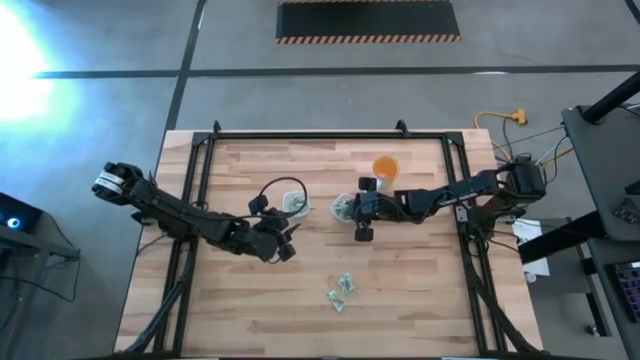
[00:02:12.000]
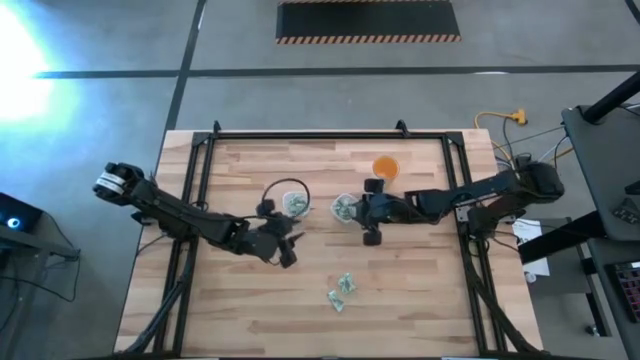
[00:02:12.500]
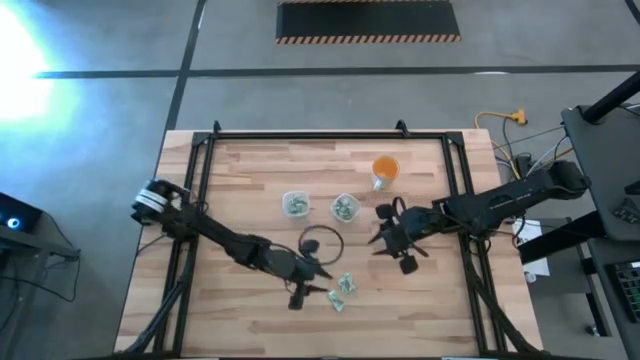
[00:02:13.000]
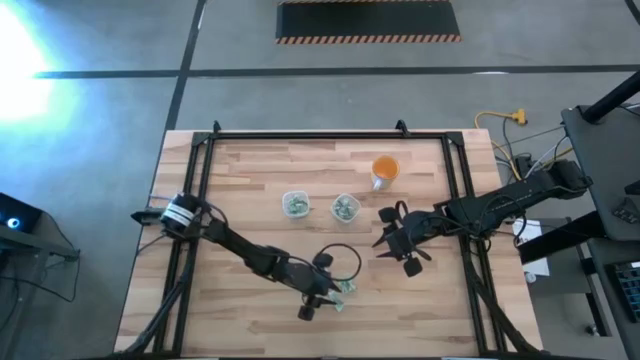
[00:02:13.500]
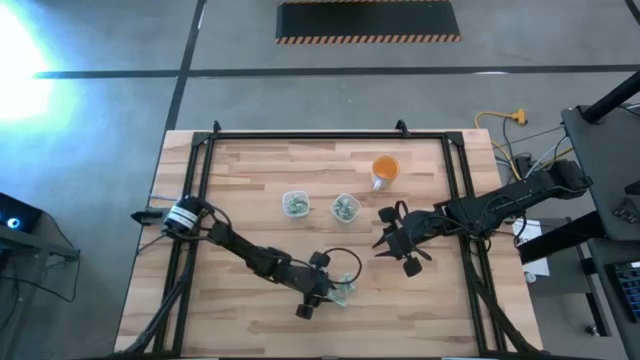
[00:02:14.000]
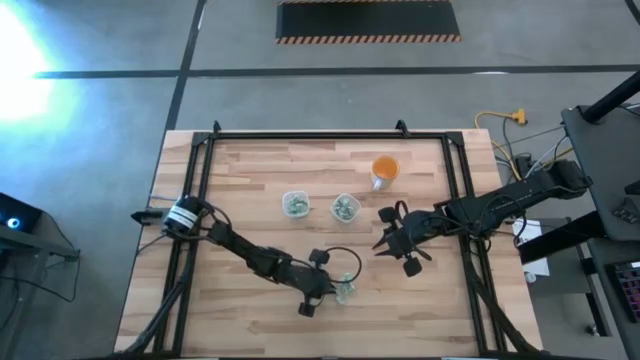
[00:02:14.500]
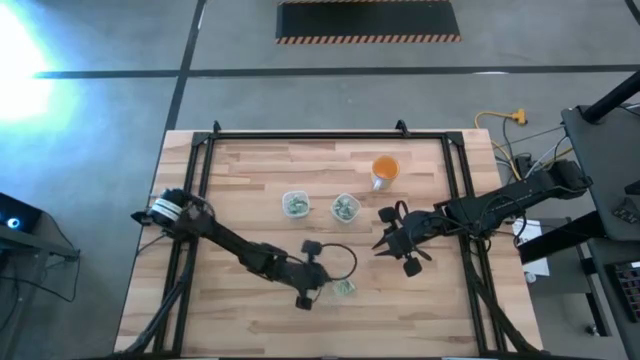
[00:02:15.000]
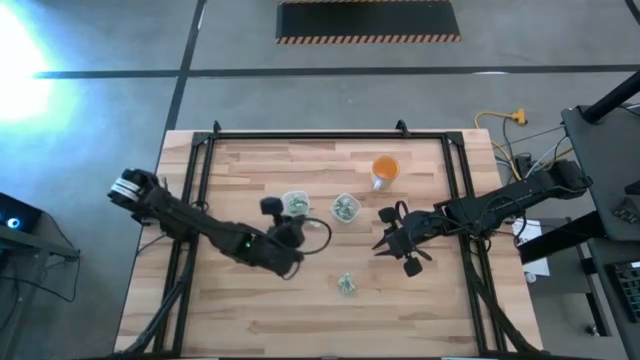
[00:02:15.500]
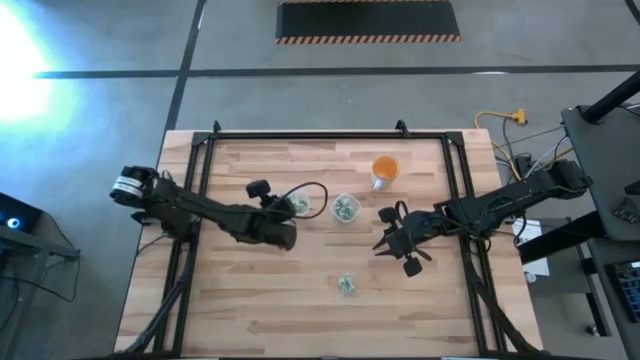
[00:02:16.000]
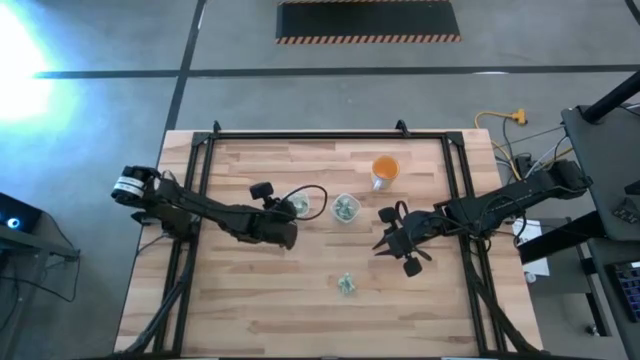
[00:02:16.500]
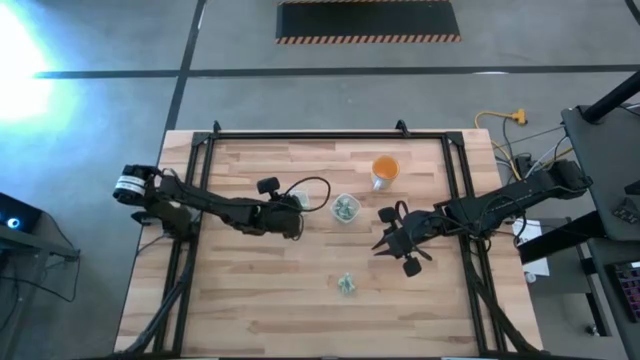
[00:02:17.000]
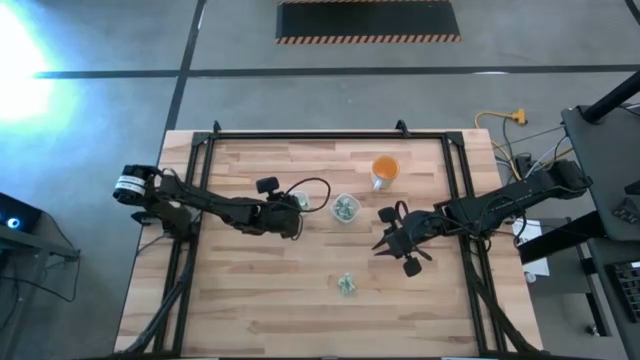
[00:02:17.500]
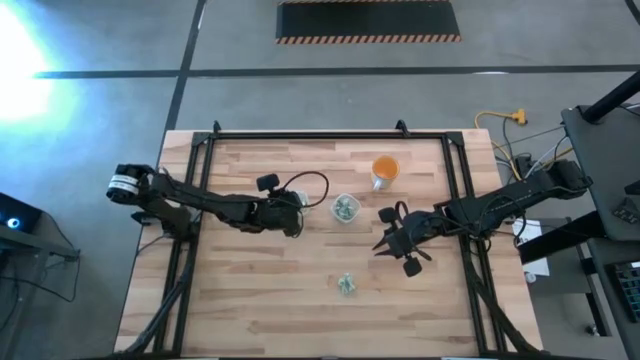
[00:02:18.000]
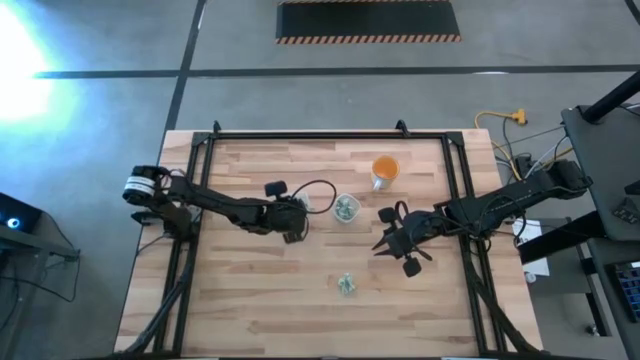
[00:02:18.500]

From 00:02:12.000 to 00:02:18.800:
Task: Pick and place items into bin
Put the white stevia packet into the left transparent bin

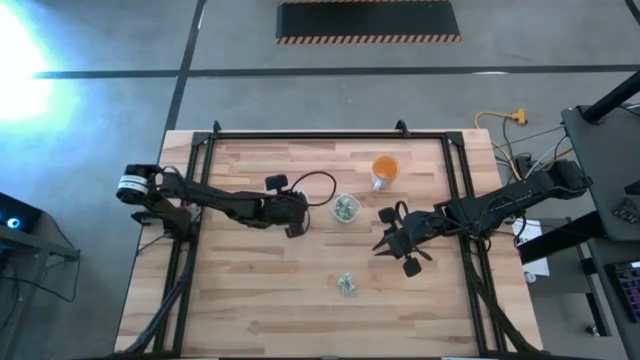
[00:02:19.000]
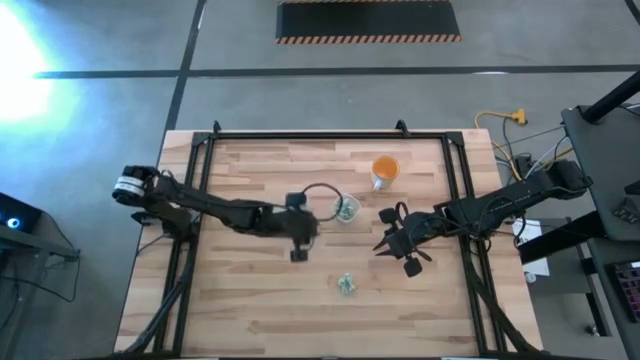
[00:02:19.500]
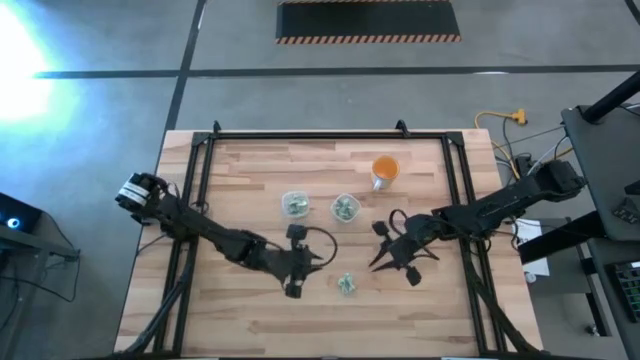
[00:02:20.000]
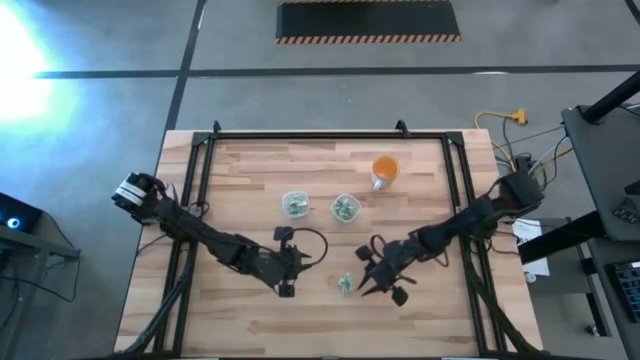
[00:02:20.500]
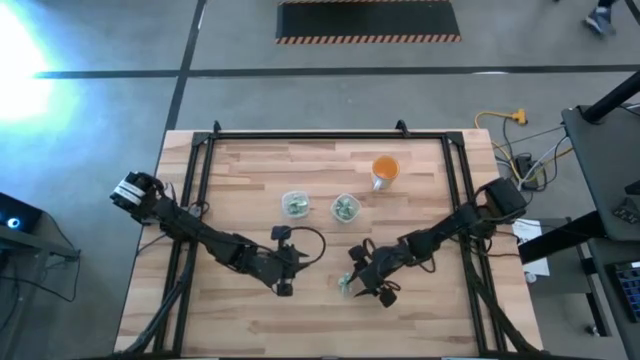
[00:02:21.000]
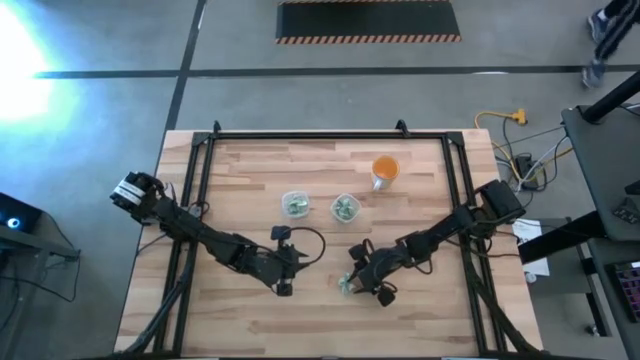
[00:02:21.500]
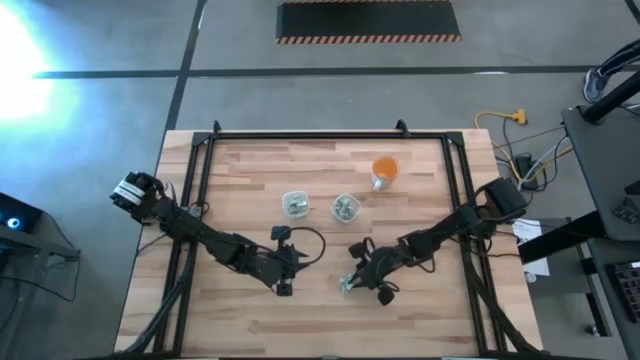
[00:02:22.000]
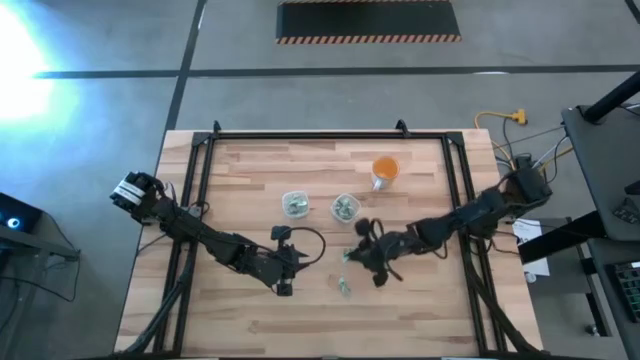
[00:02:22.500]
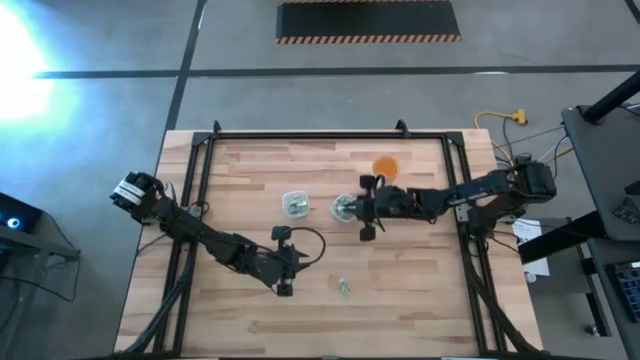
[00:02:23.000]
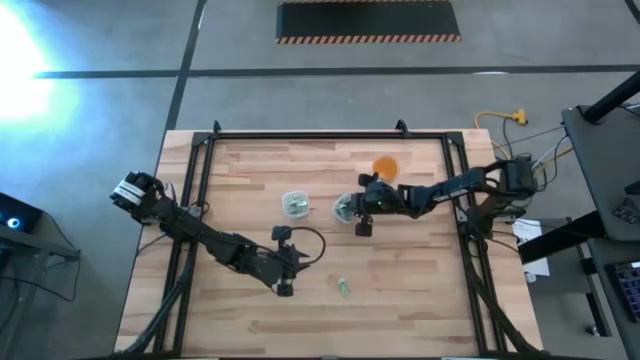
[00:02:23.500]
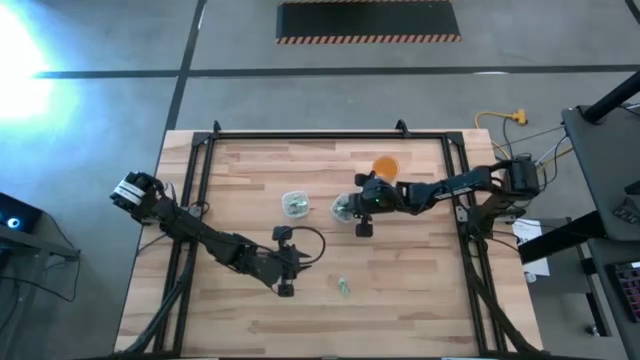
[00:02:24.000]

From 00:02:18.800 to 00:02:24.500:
Put the white stevia packet into the right transparent bin

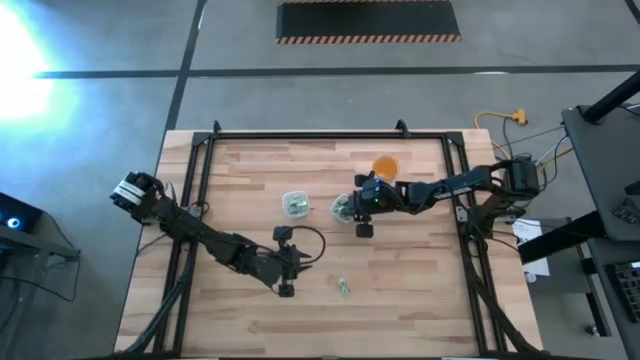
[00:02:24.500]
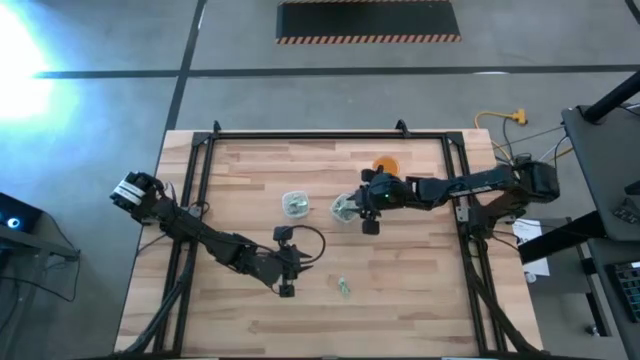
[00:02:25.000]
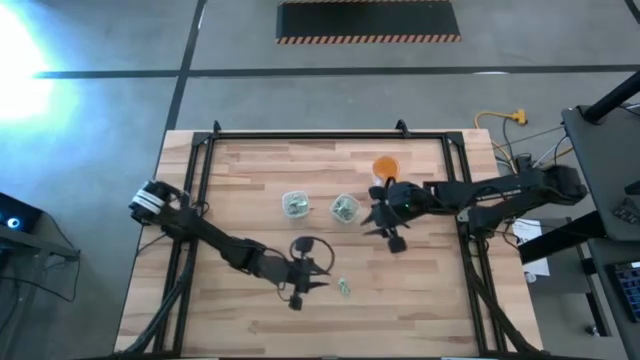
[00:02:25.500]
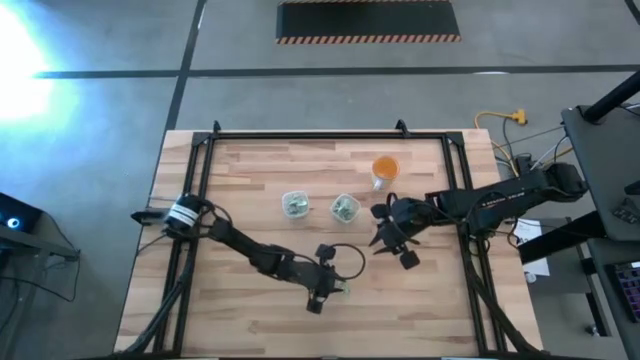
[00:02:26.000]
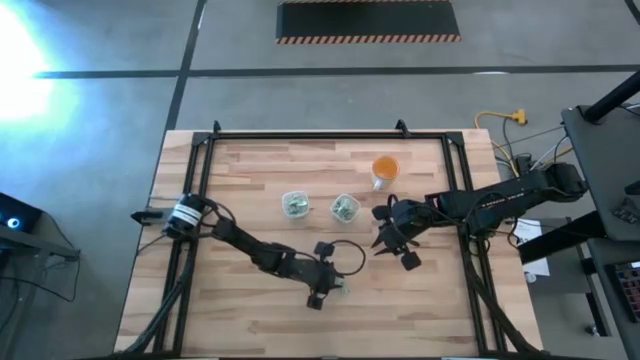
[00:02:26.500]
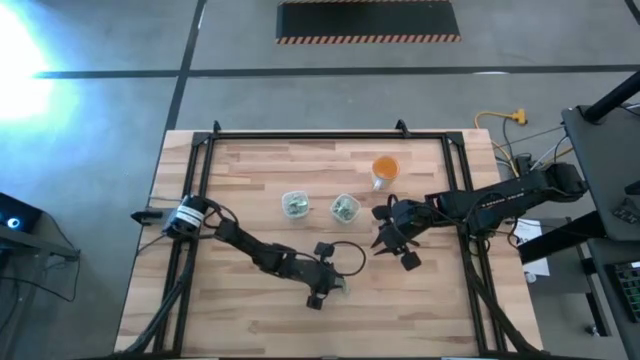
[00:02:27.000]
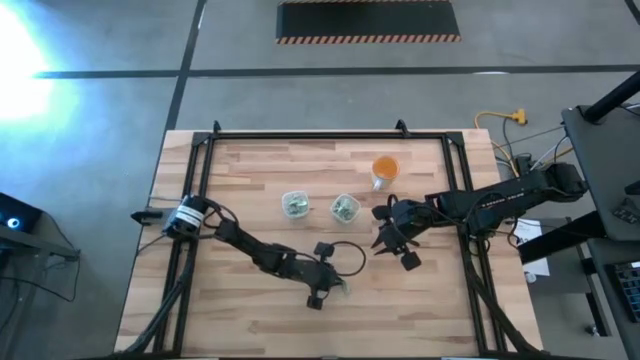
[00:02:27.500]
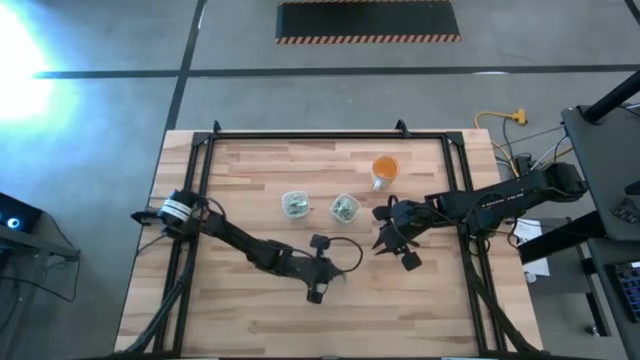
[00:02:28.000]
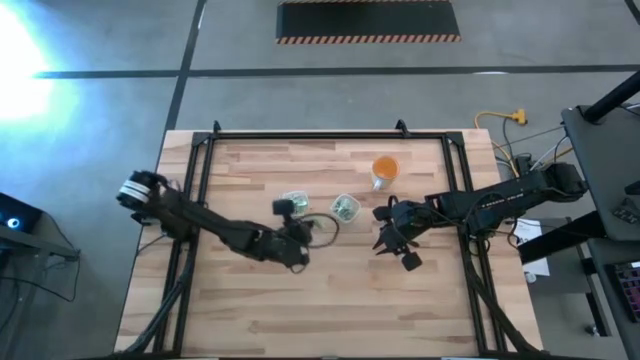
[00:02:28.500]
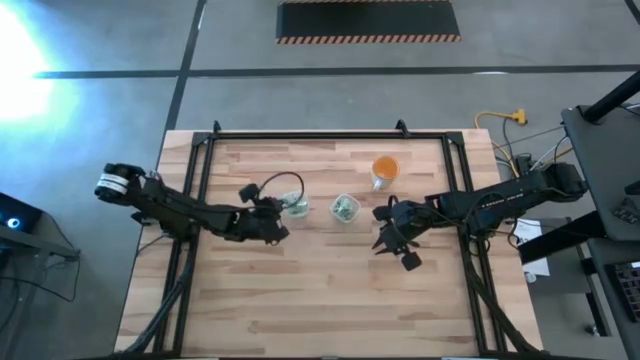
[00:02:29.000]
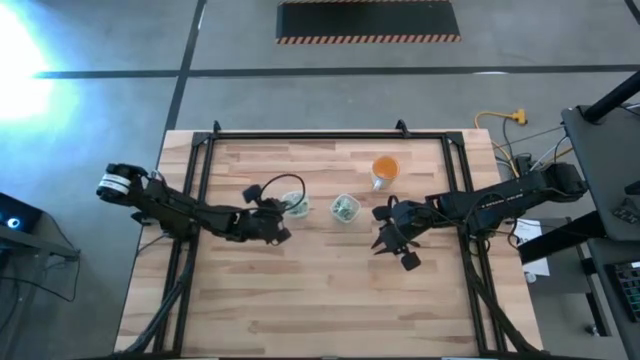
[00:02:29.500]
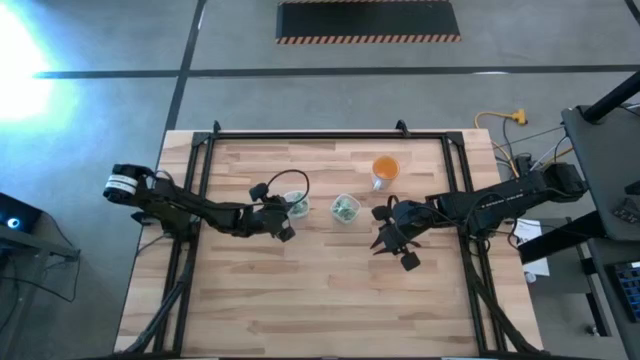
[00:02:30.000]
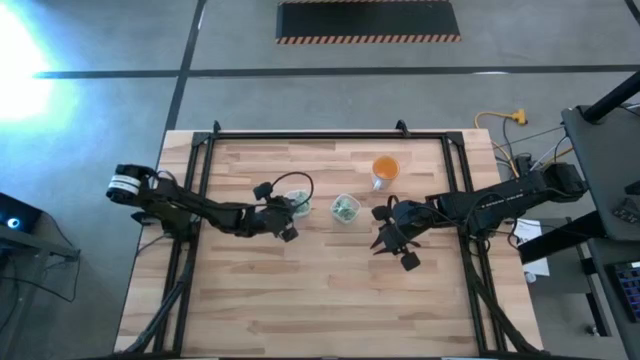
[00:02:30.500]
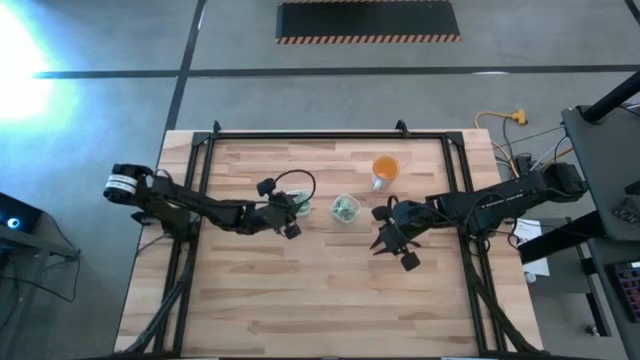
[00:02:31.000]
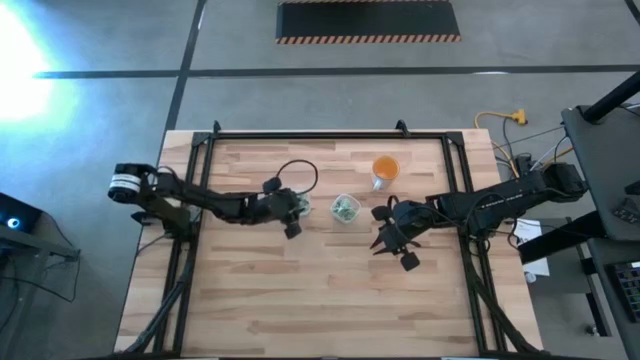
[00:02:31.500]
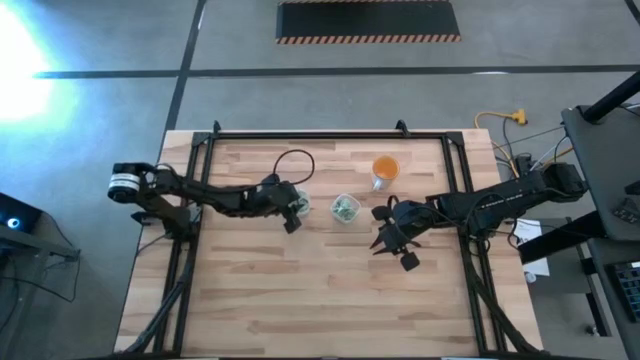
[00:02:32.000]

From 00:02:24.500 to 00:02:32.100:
Put the white stevia packet into the left transparent bin
